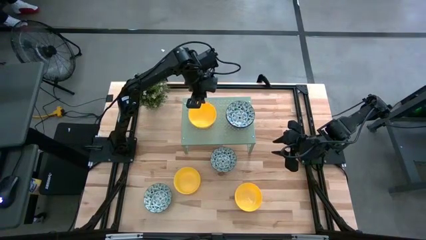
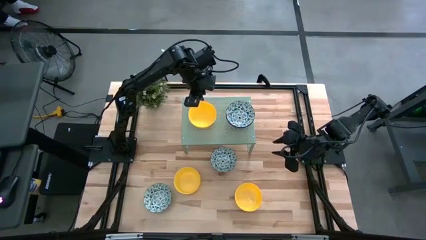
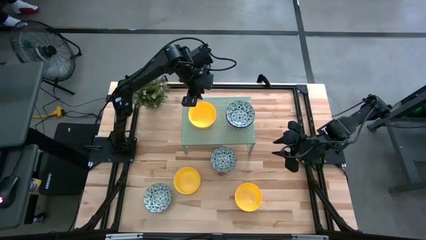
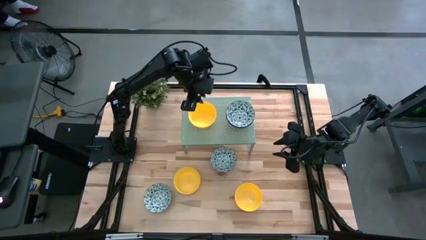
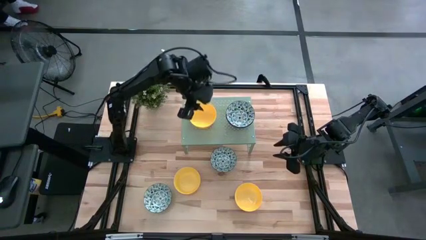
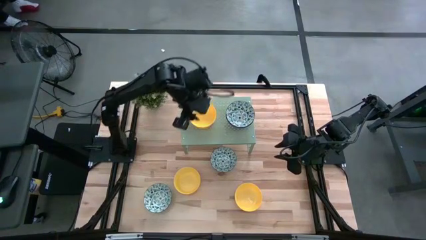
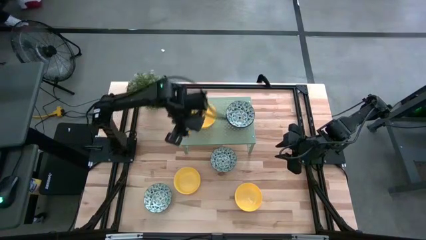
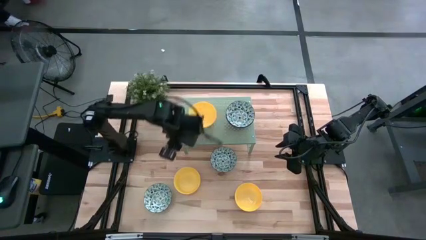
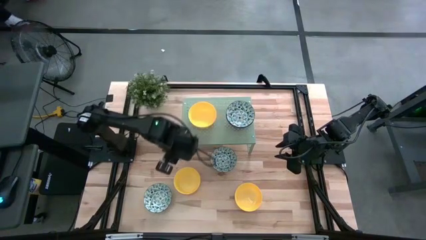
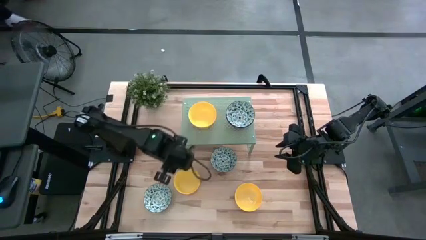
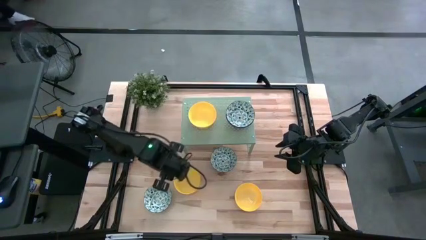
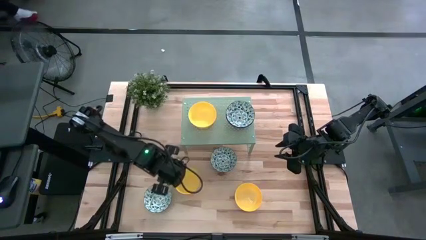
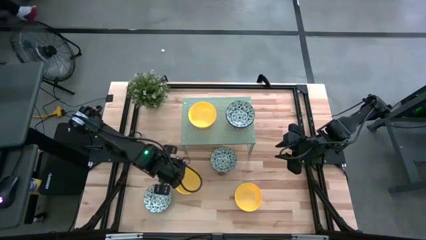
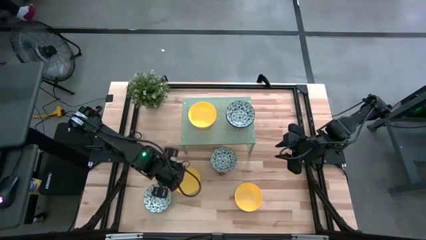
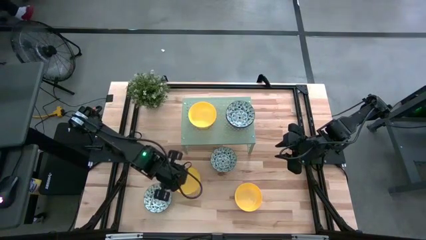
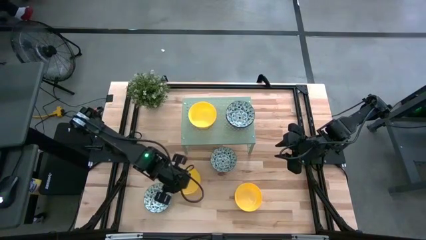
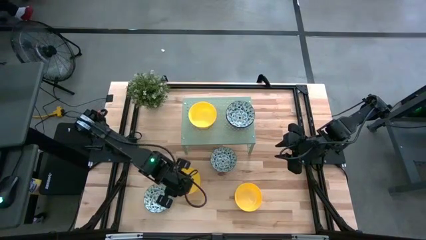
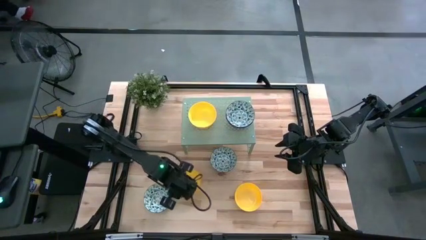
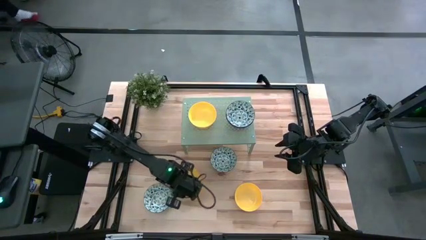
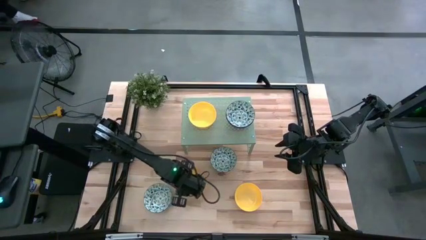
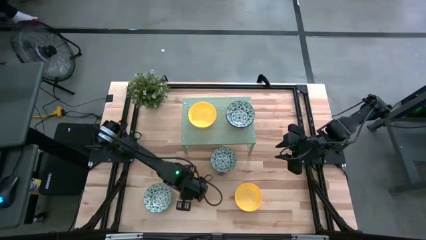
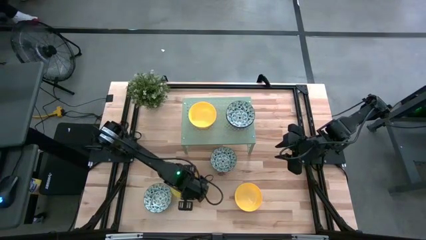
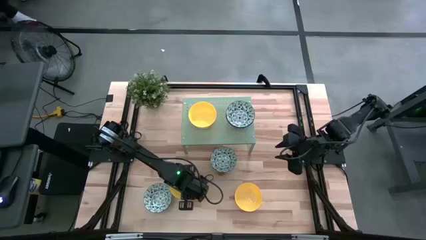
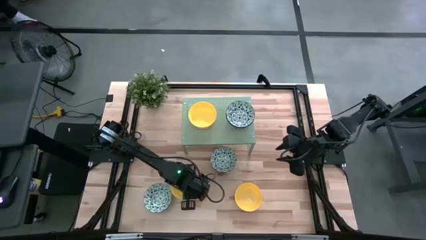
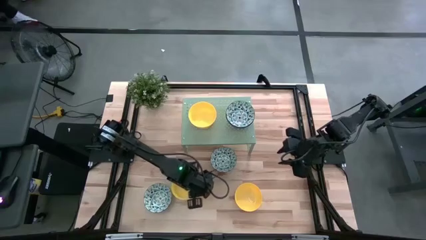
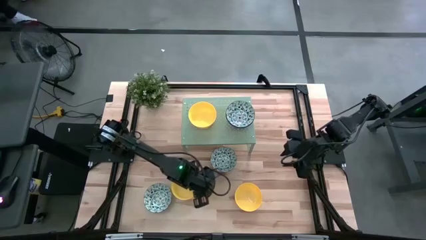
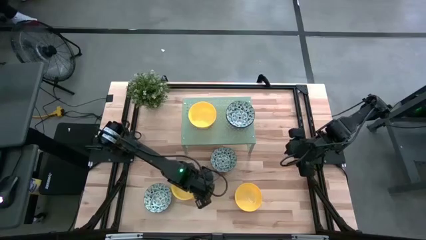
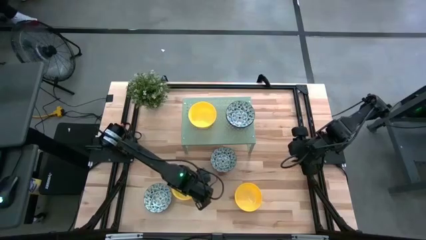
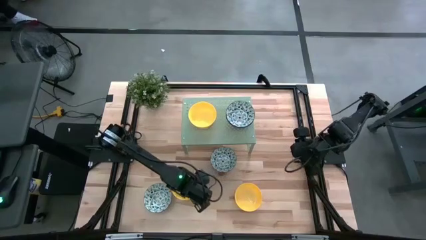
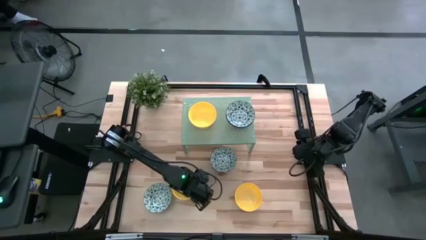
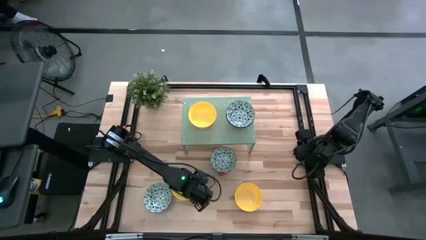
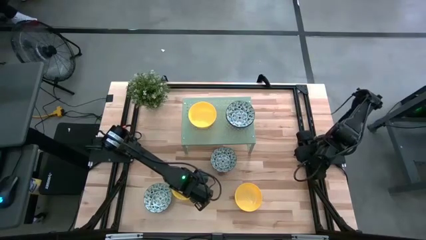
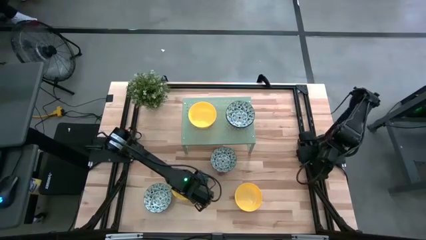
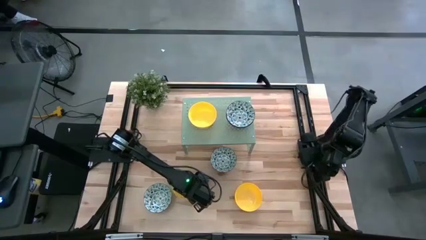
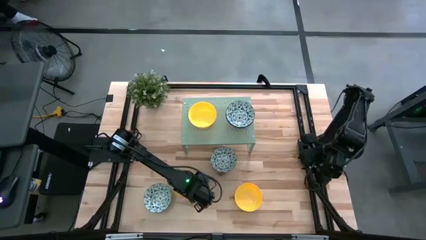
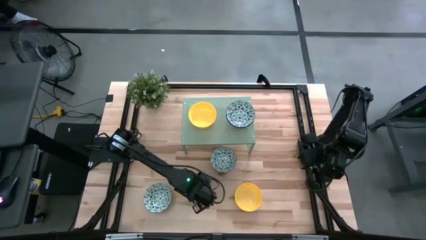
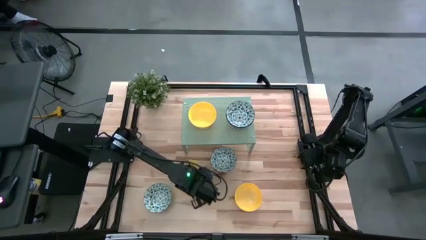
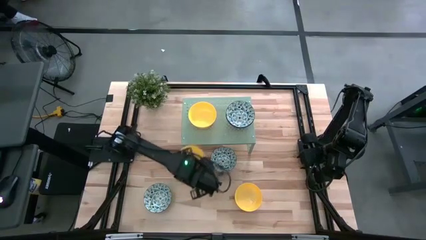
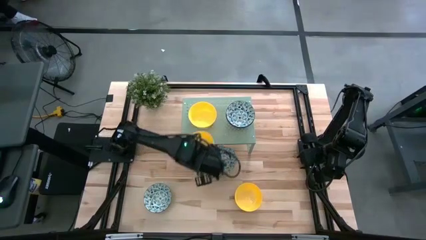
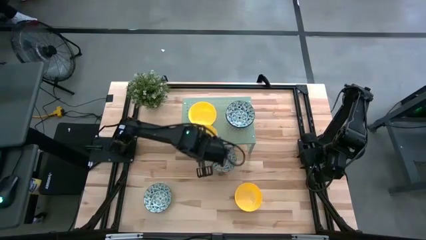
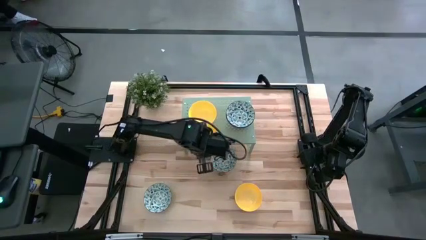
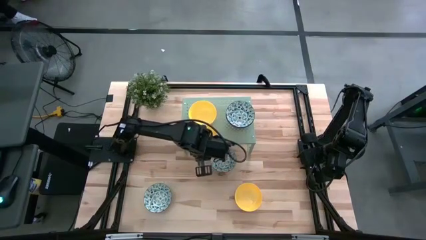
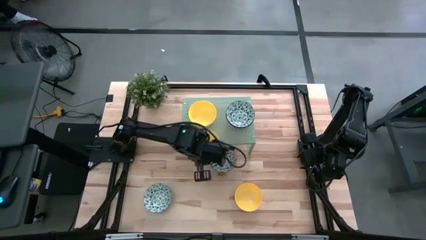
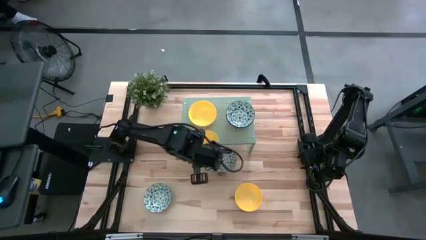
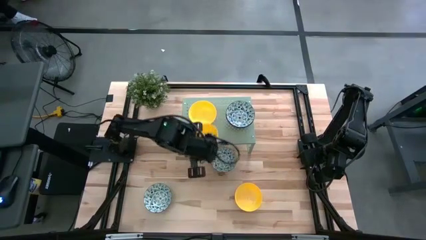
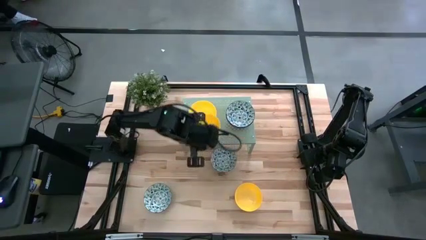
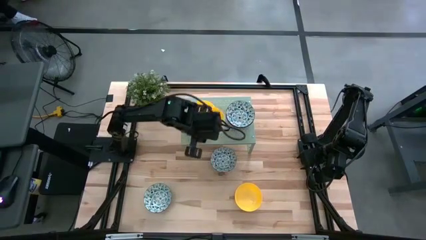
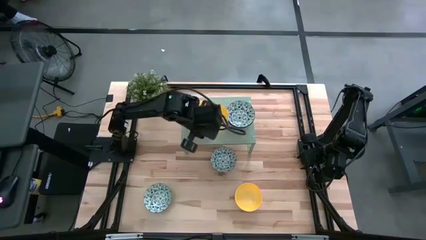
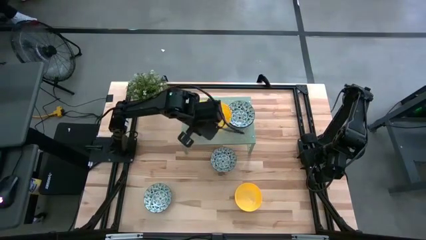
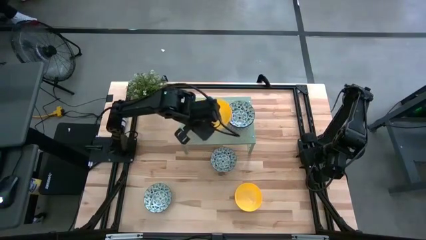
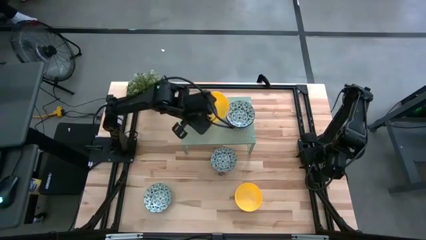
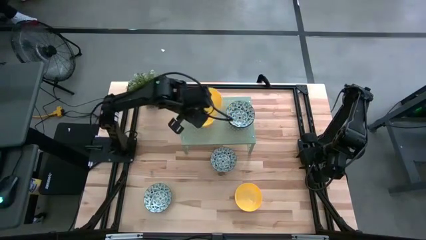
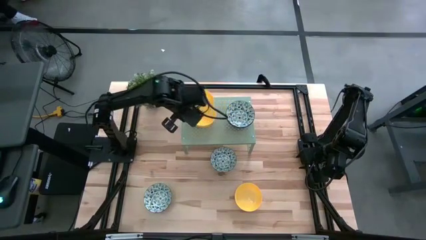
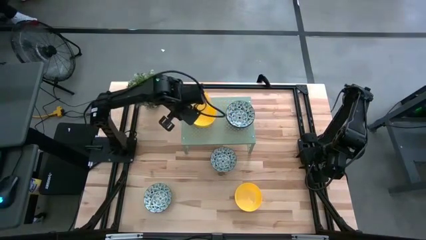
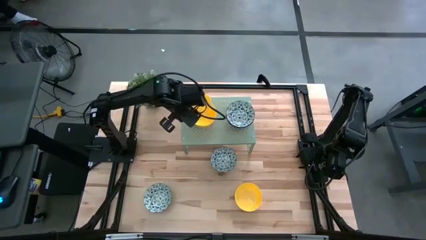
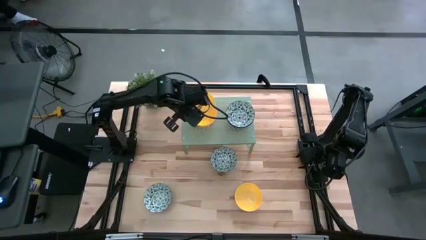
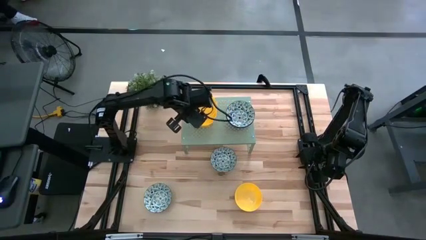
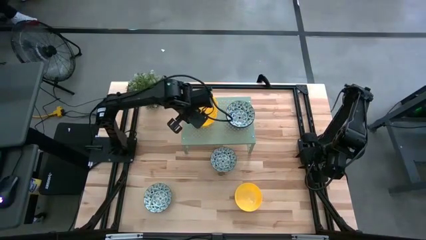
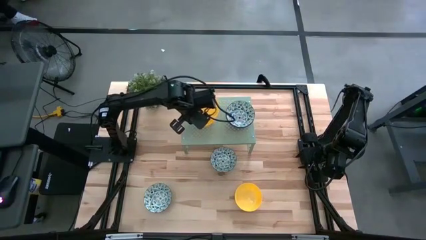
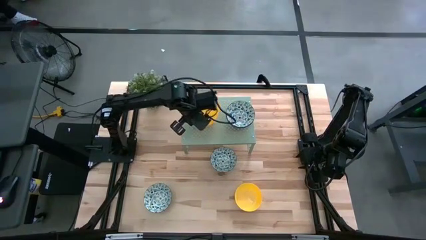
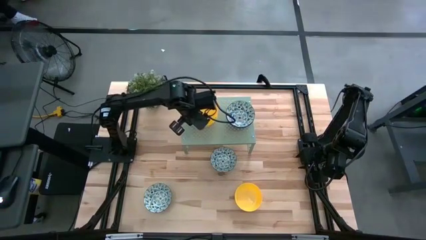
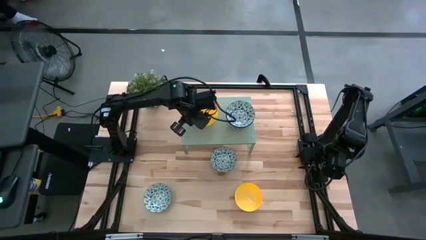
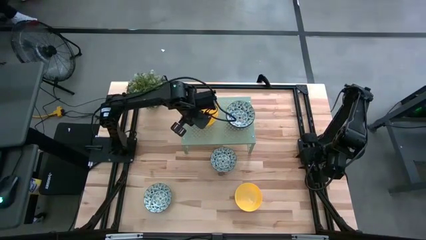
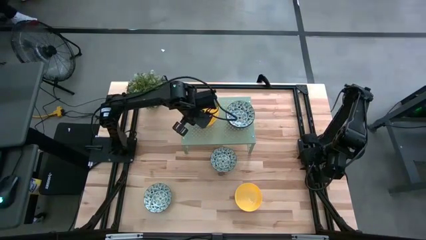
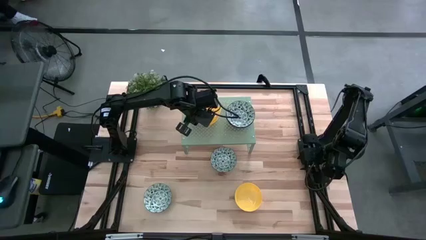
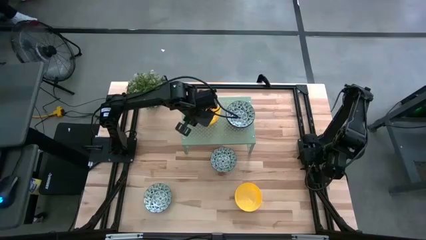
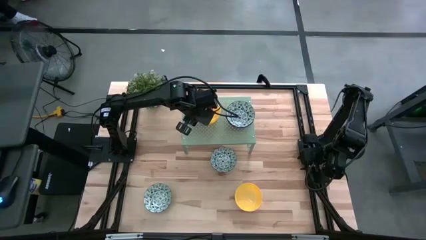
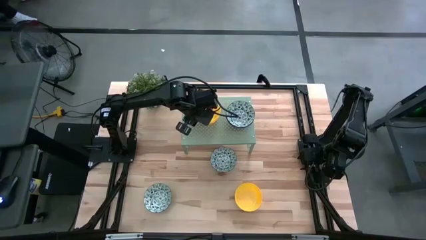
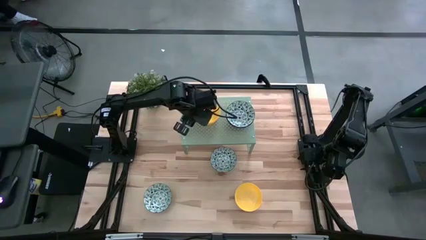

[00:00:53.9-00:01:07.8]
Task: Pick & Place Mini bowls
Stack the left yellow bowl on top of the yellow bowl on the shelf

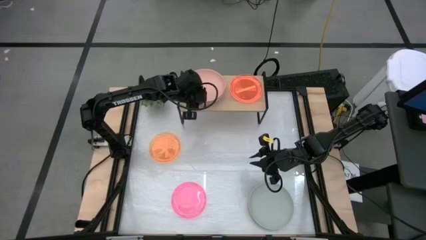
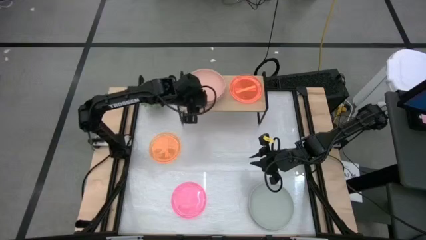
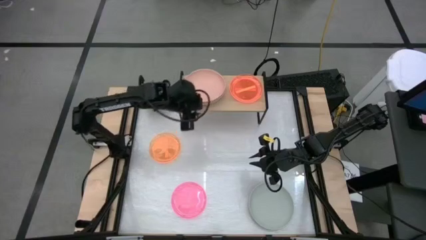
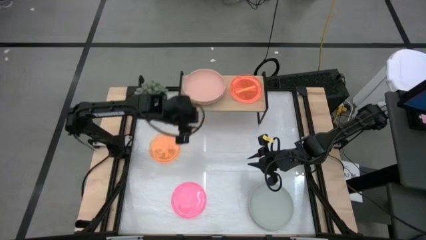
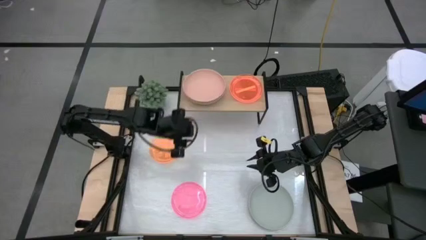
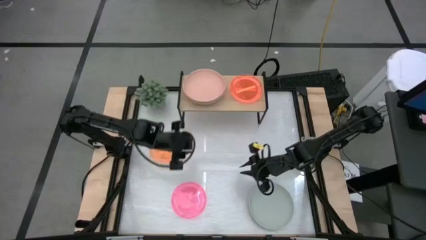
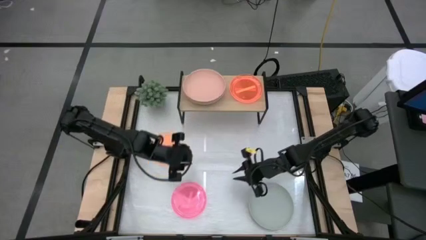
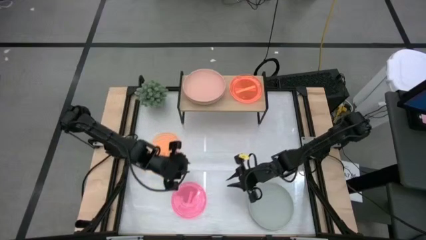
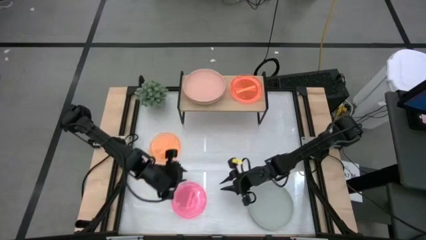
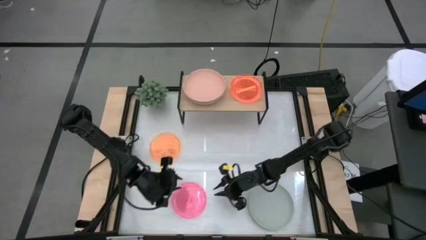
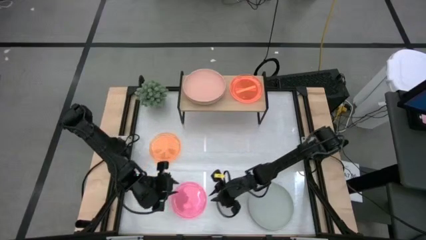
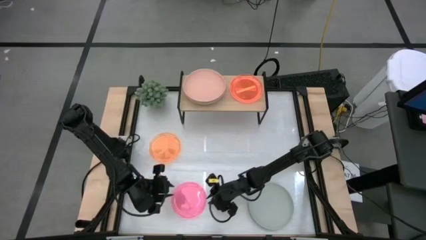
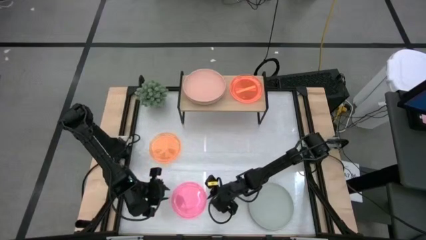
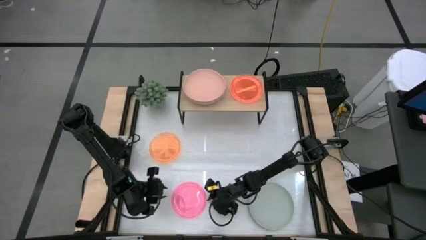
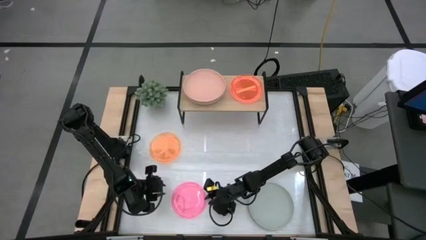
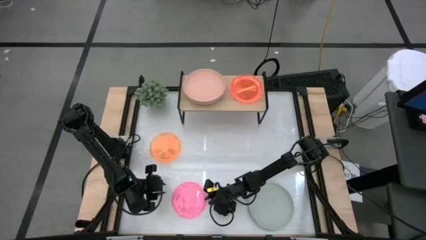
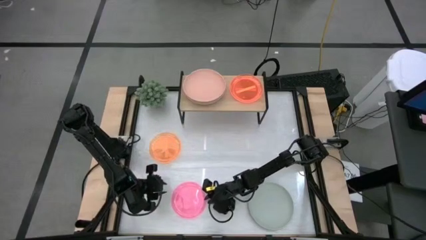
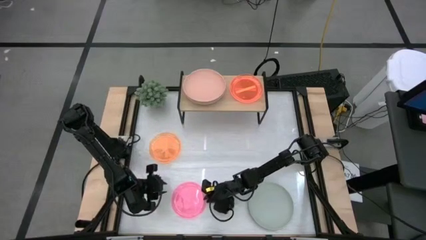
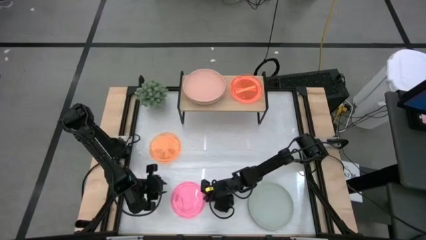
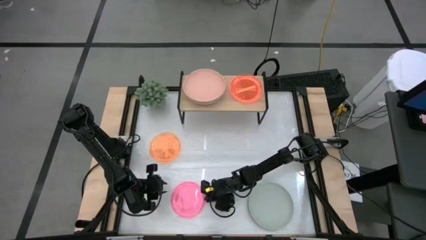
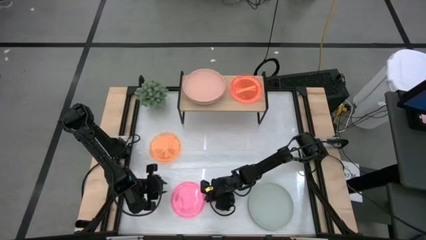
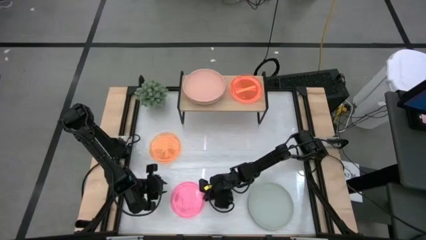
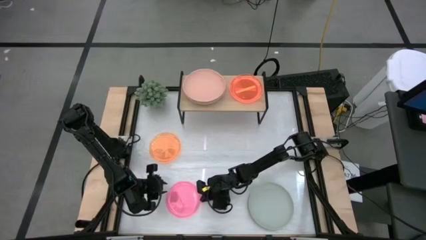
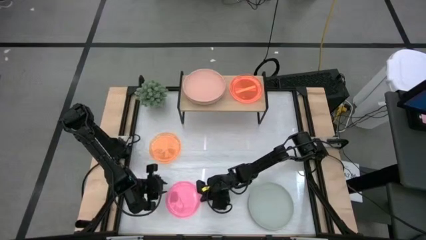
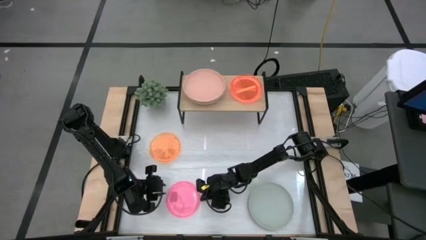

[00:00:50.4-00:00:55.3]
Task: Place and stack plates onto a shelf
Stack the pink plate on top of the orange transparent plate
